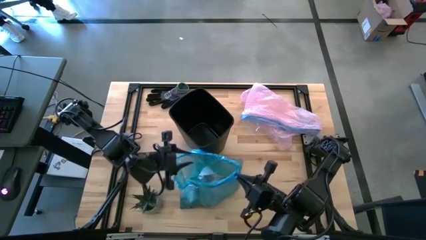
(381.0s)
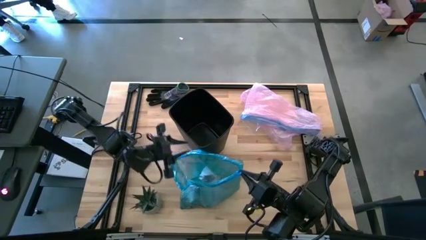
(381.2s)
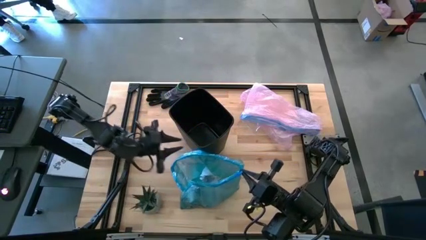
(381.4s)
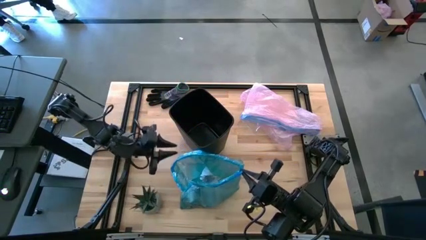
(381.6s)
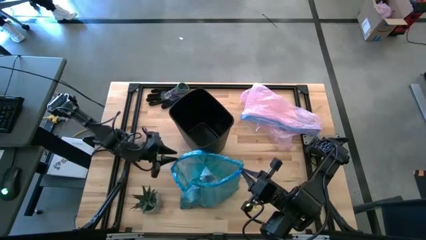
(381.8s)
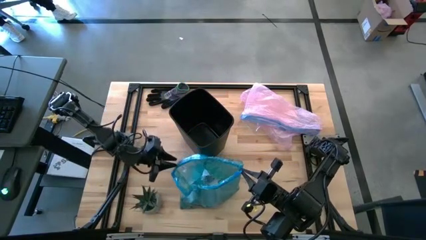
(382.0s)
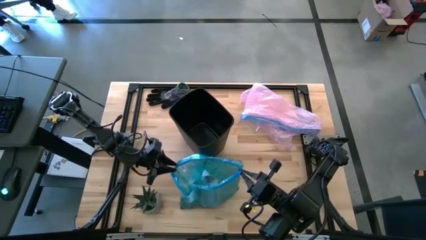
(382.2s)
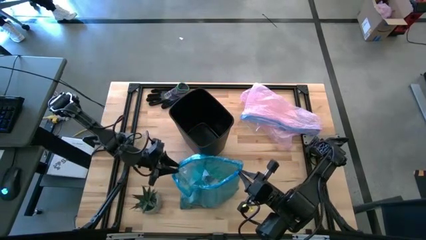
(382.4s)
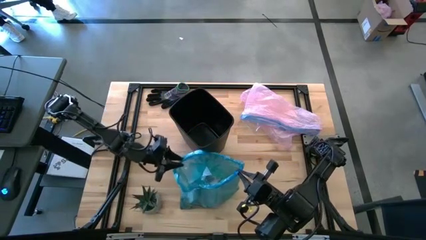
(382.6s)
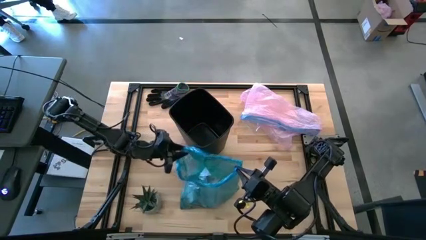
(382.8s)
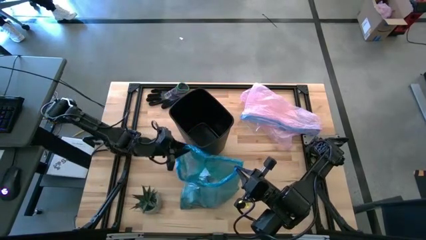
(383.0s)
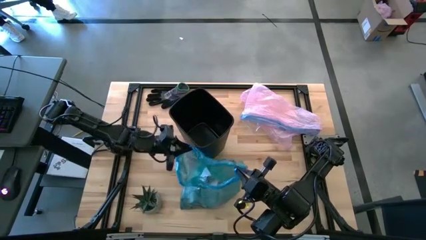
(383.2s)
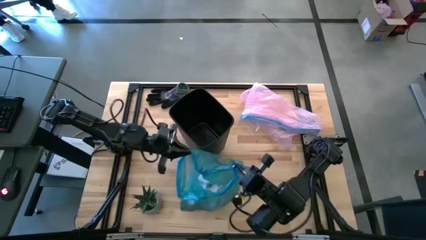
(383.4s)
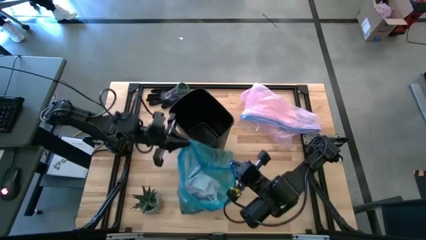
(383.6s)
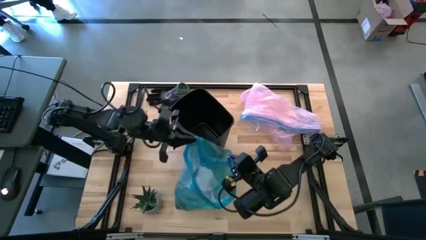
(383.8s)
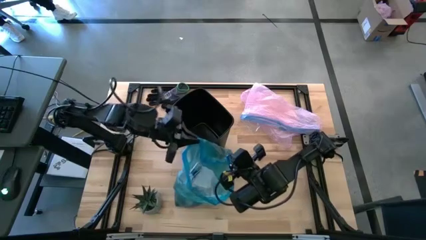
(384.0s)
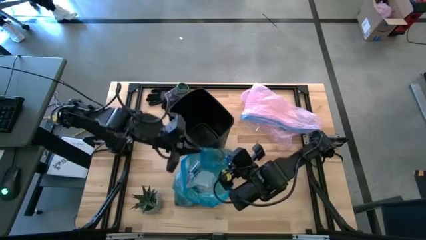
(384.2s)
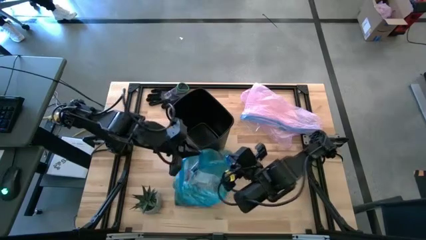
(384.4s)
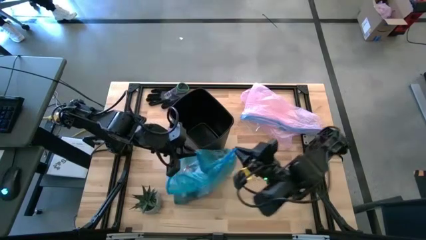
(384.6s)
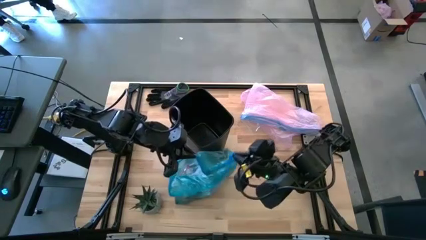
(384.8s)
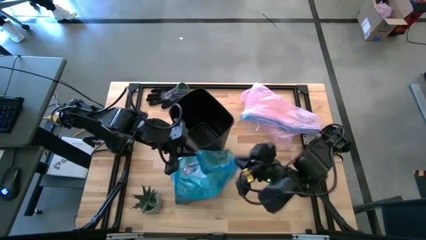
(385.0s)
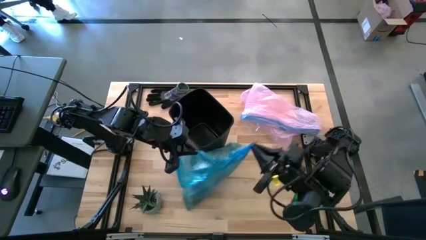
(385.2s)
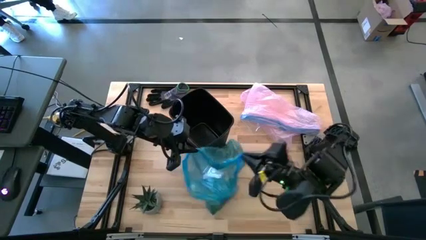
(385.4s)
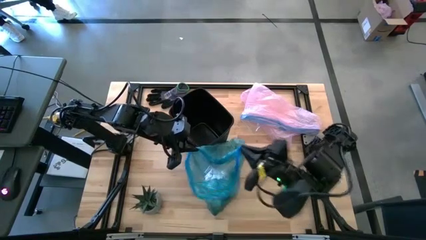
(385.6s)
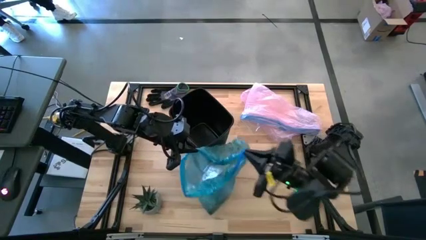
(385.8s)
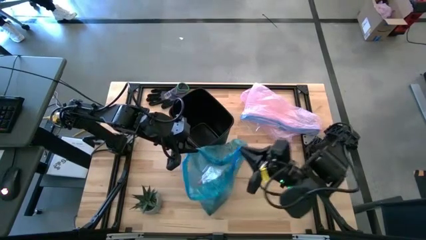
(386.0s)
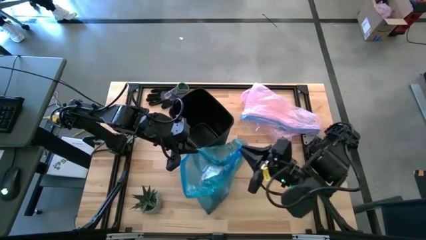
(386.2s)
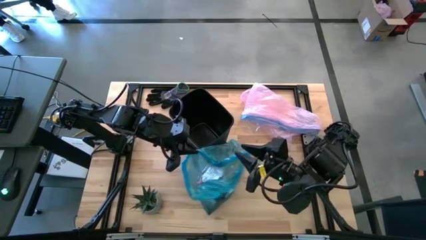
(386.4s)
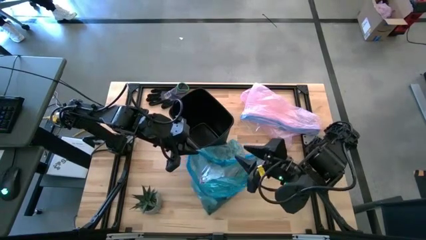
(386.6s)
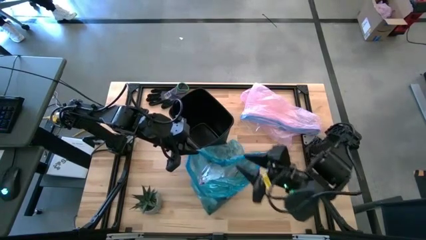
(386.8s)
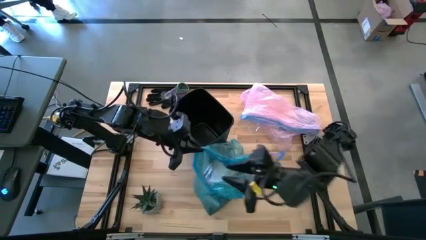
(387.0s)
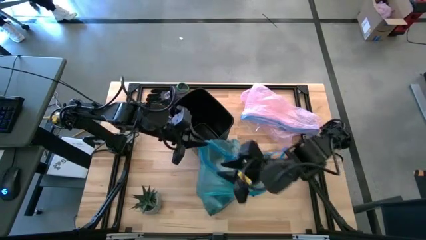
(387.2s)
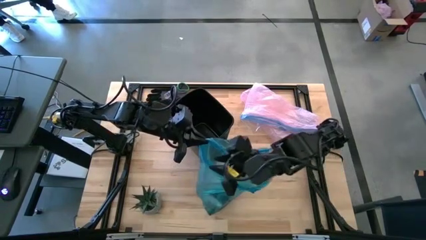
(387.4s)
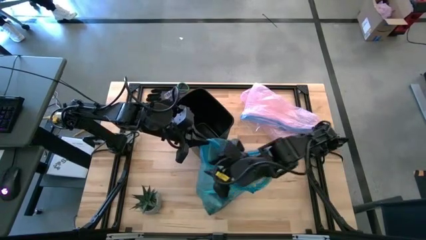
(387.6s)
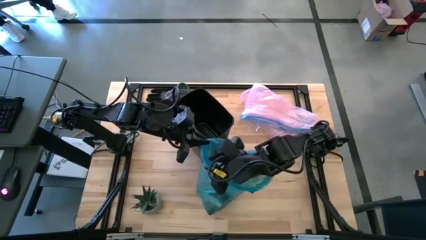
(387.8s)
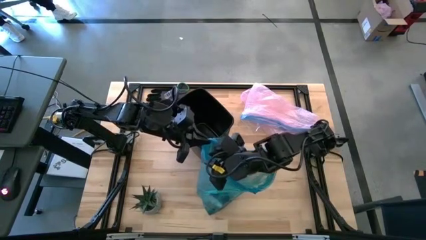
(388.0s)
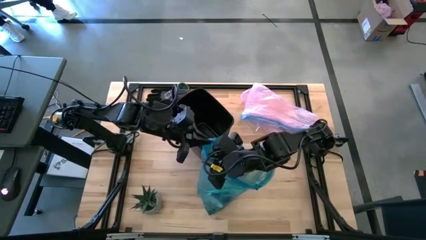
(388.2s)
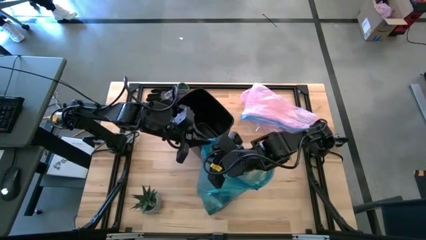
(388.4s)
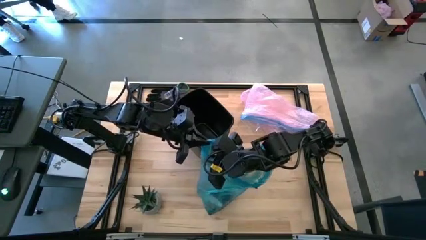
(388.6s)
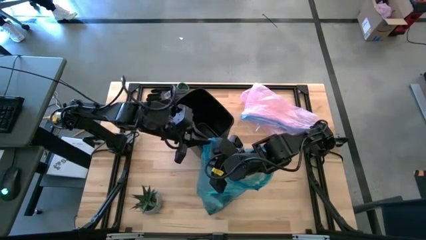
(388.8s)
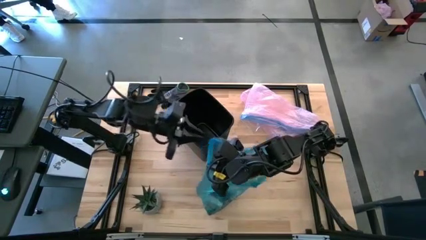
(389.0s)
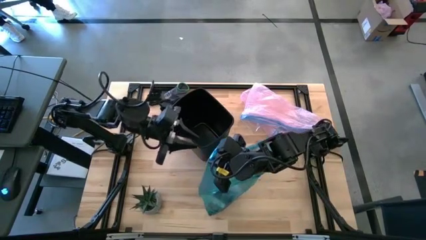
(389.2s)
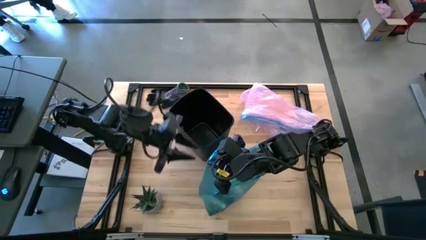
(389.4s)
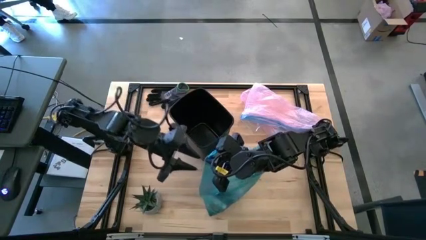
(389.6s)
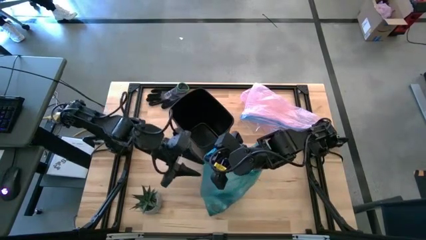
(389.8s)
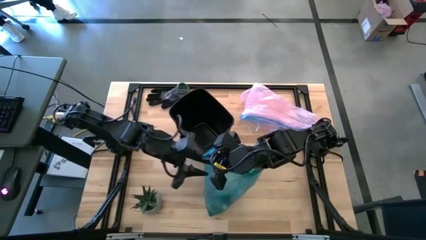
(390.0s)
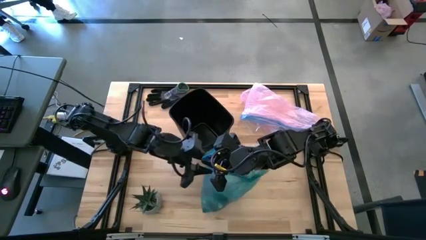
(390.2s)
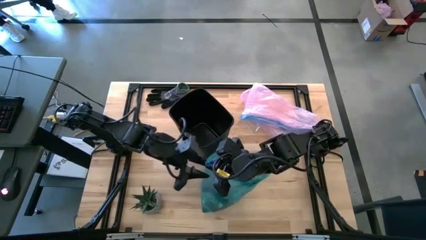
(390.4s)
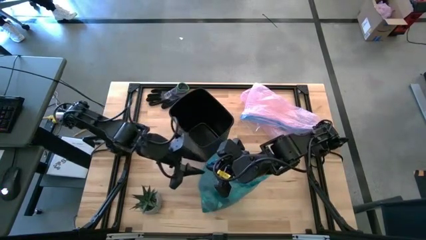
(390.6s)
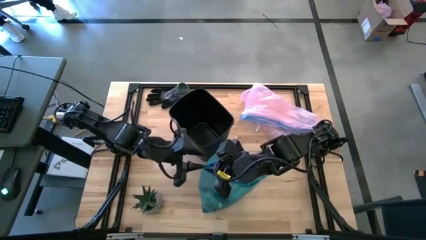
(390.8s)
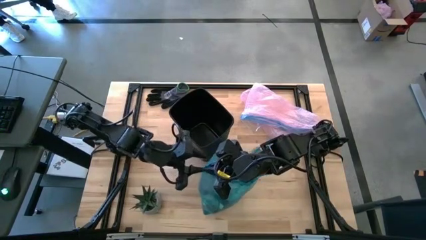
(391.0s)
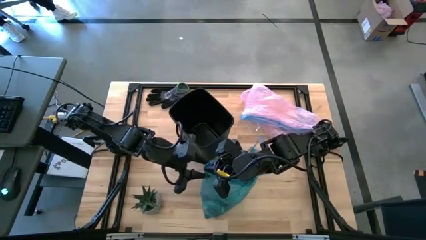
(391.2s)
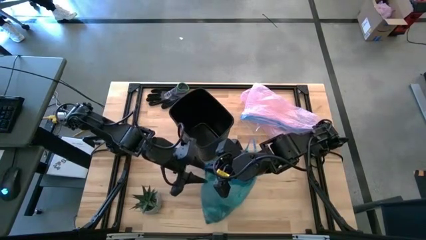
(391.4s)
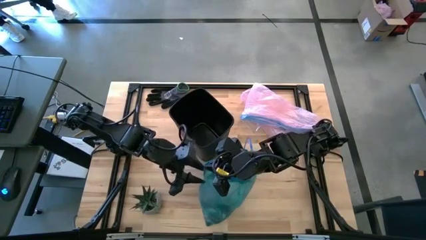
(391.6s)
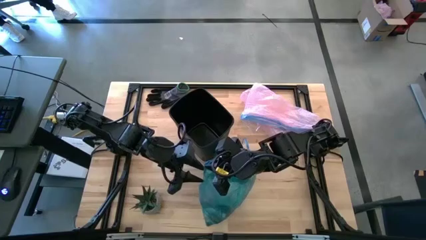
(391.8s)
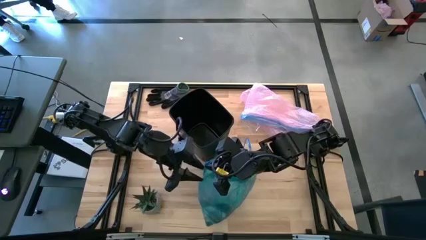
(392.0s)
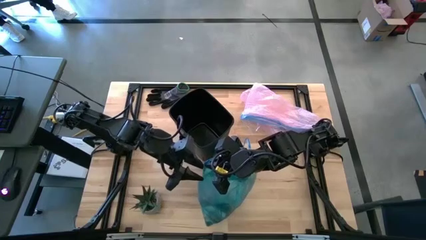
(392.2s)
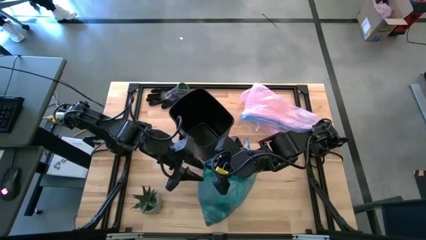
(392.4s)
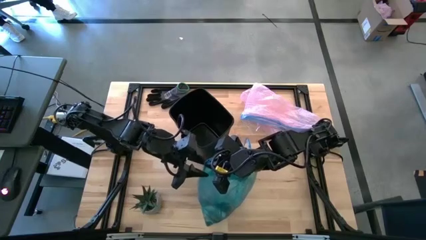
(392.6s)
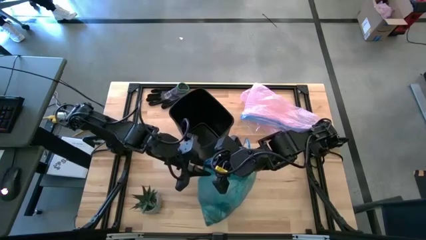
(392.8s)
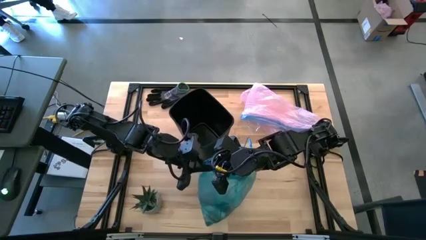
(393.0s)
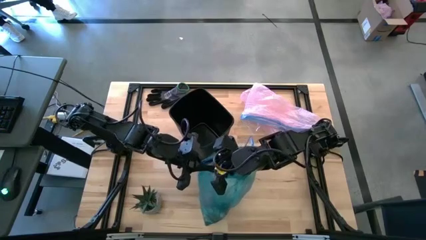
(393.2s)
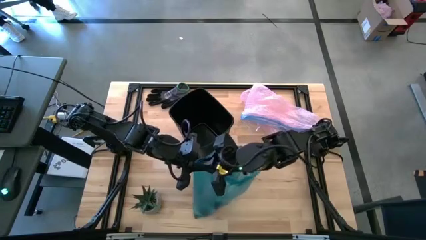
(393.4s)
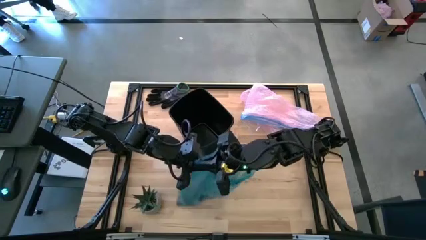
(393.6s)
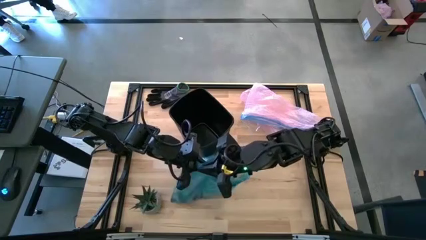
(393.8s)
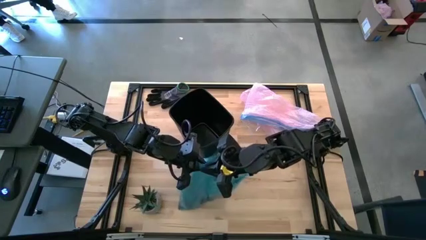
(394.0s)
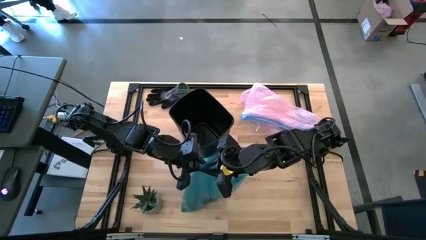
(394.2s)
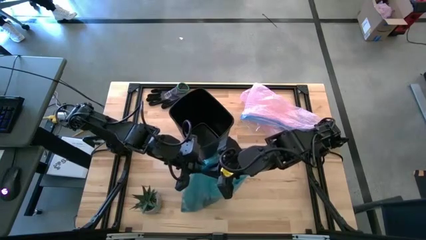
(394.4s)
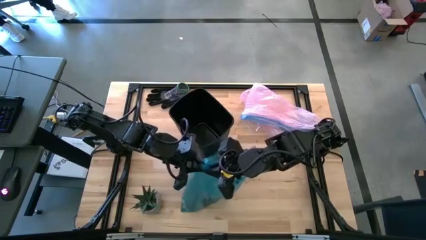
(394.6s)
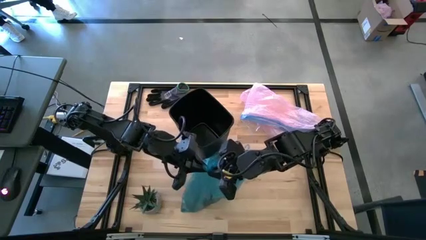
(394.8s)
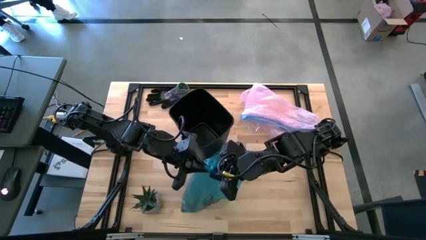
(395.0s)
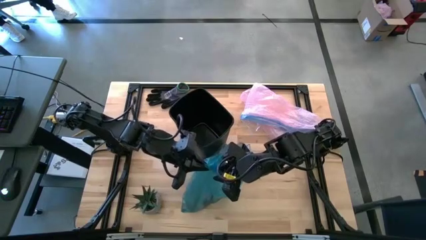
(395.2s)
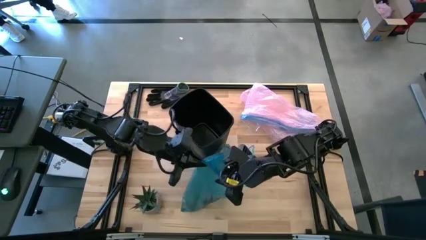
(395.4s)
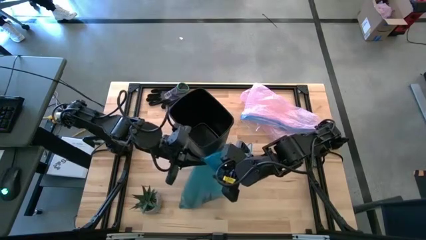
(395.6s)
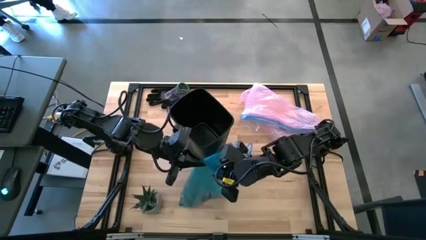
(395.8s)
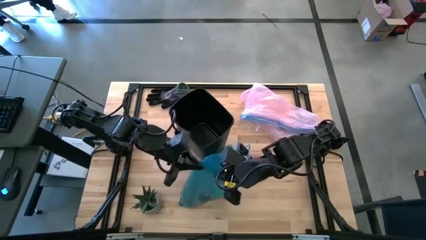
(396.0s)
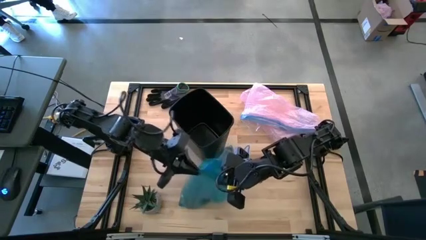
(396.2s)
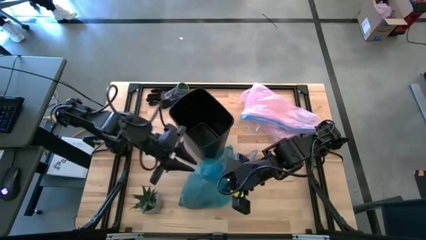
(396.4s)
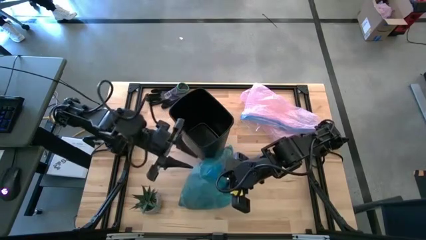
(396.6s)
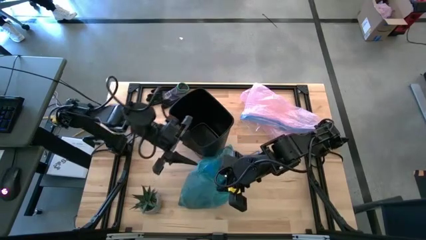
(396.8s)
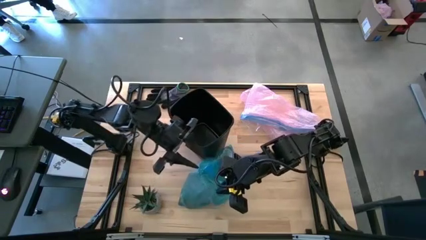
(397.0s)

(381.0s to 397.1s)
Task: place trash/remove bag and relplace
Close the blue trash bag
